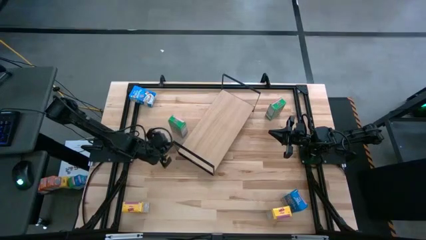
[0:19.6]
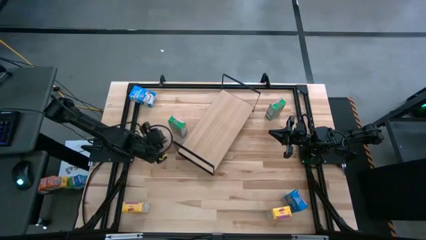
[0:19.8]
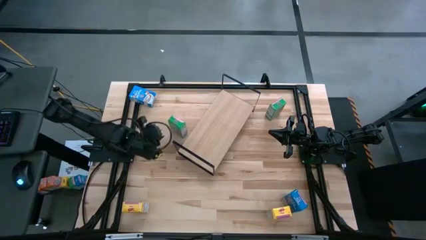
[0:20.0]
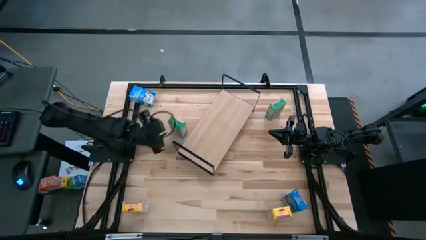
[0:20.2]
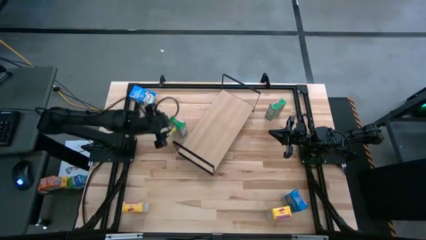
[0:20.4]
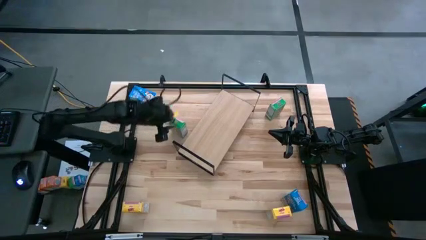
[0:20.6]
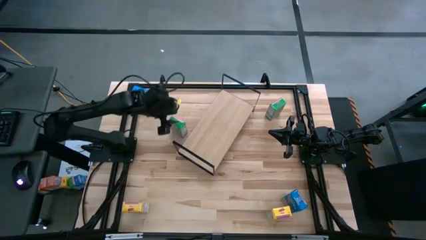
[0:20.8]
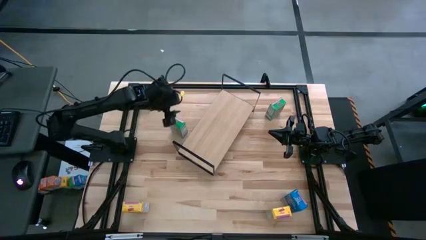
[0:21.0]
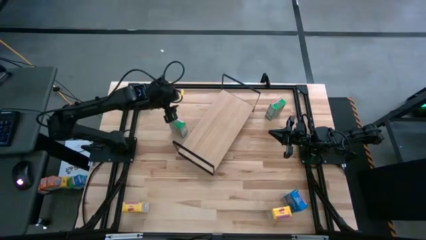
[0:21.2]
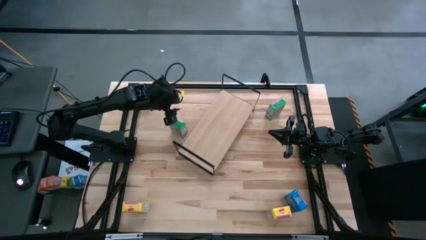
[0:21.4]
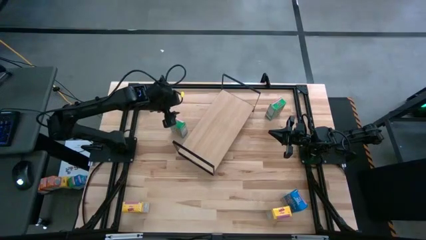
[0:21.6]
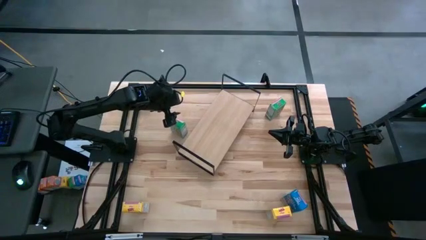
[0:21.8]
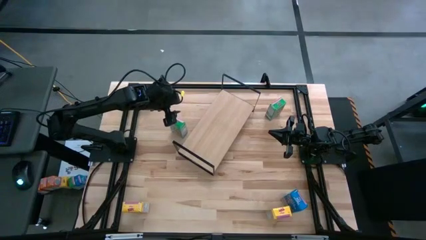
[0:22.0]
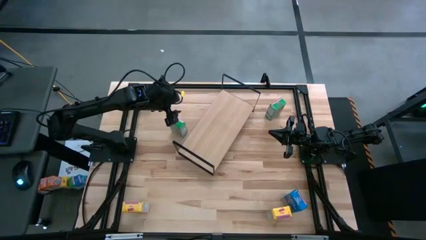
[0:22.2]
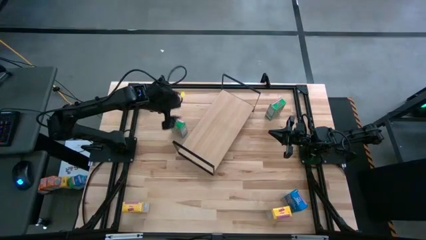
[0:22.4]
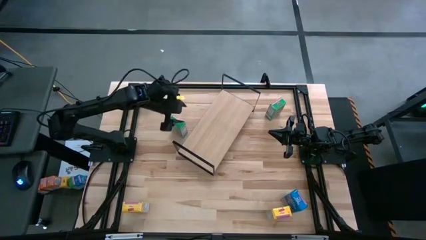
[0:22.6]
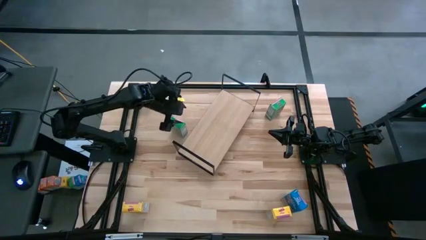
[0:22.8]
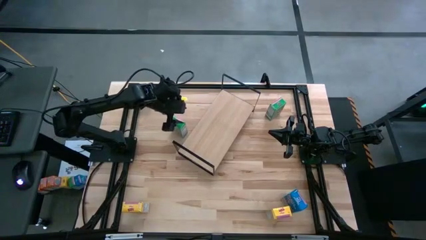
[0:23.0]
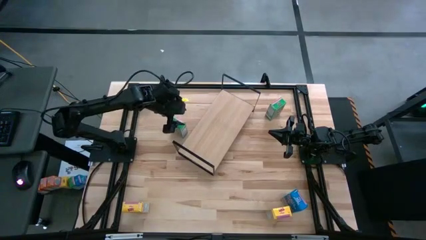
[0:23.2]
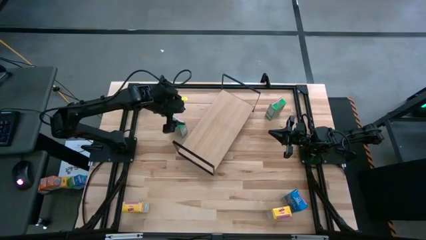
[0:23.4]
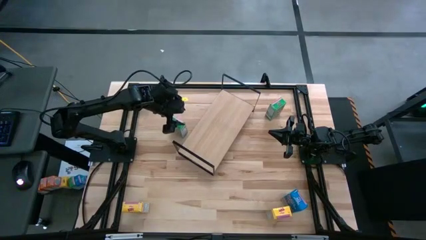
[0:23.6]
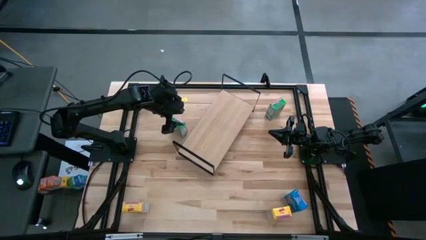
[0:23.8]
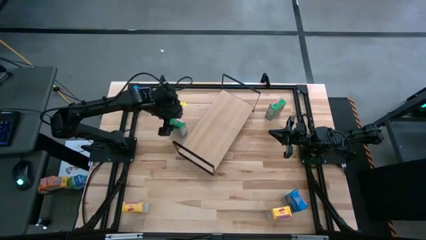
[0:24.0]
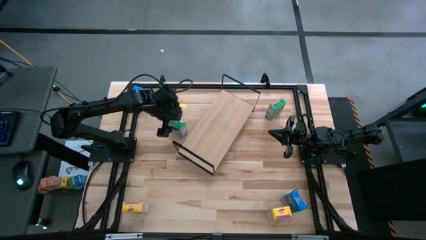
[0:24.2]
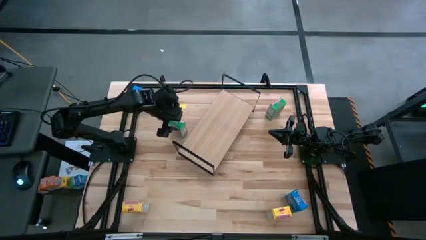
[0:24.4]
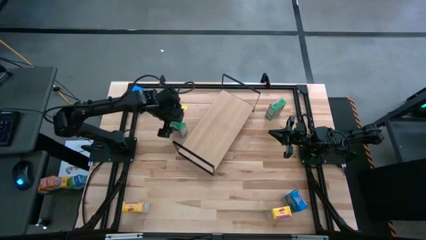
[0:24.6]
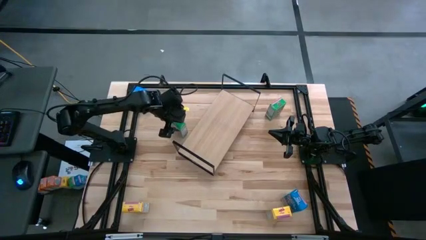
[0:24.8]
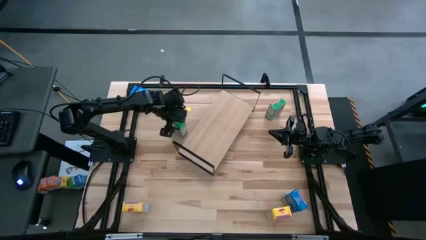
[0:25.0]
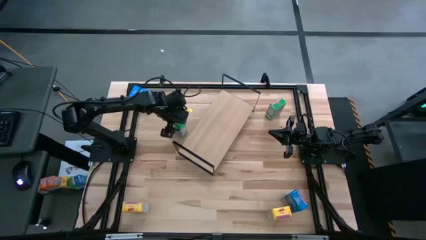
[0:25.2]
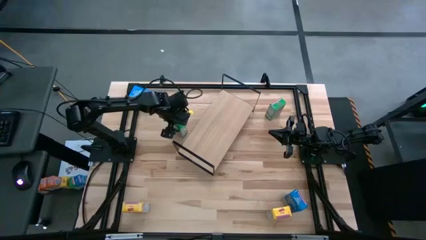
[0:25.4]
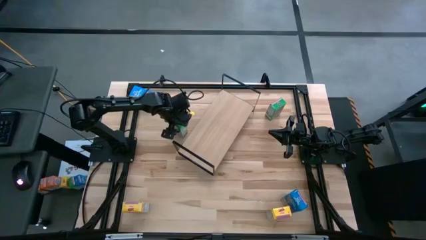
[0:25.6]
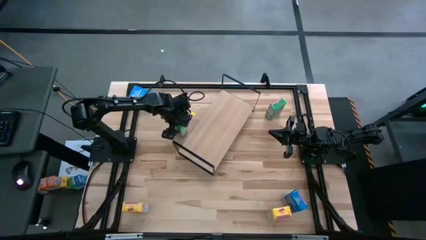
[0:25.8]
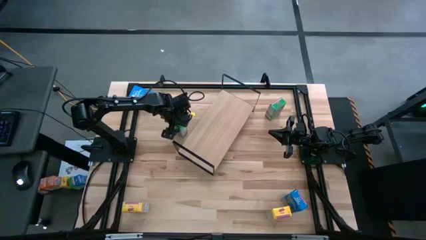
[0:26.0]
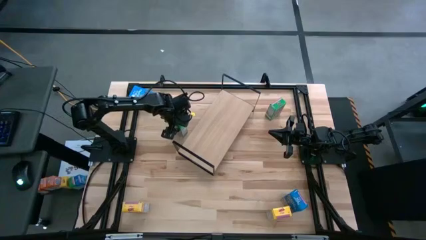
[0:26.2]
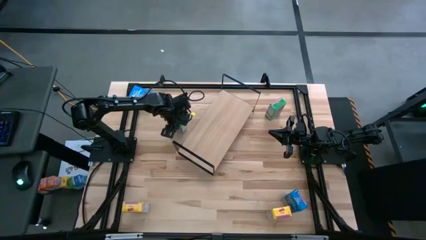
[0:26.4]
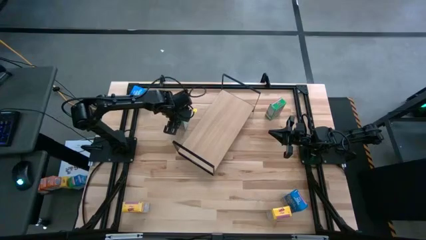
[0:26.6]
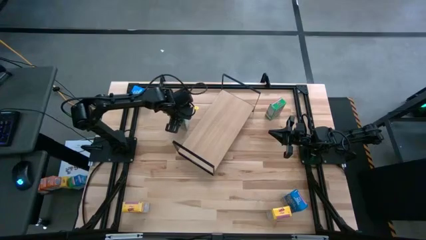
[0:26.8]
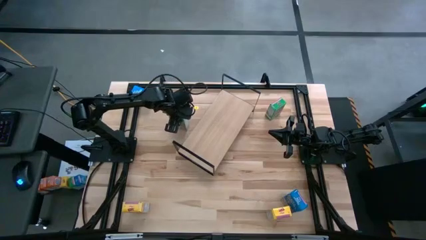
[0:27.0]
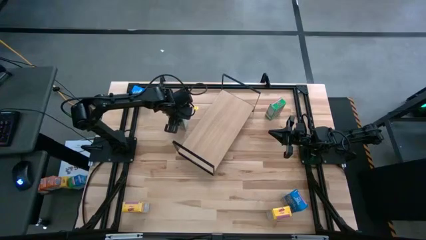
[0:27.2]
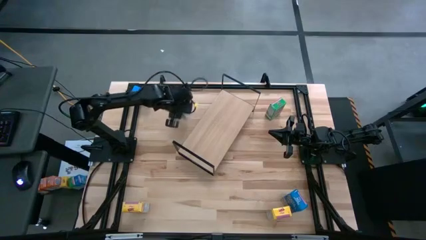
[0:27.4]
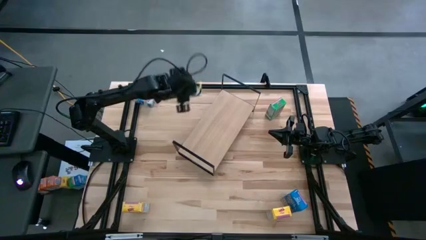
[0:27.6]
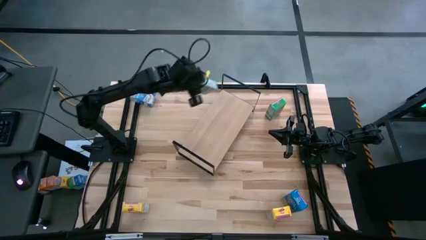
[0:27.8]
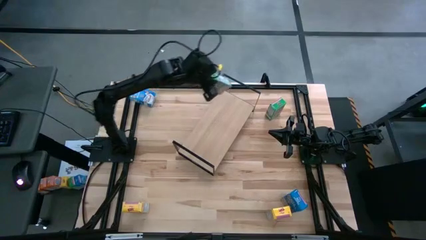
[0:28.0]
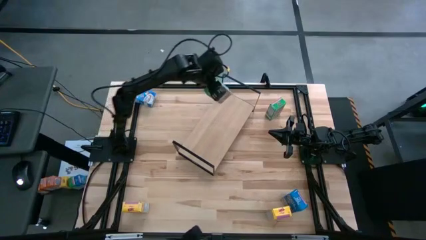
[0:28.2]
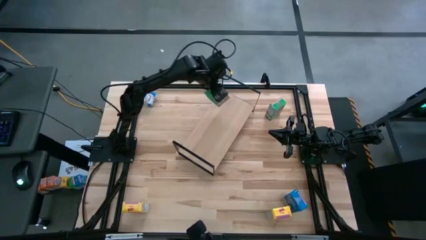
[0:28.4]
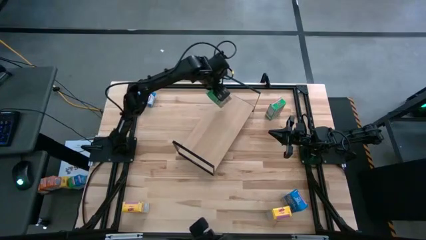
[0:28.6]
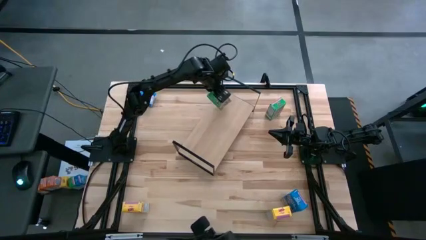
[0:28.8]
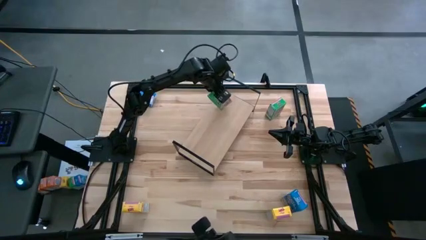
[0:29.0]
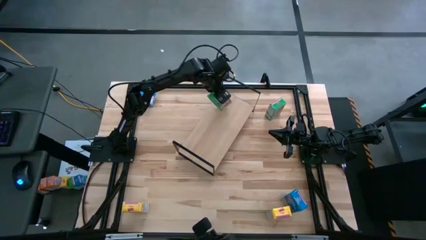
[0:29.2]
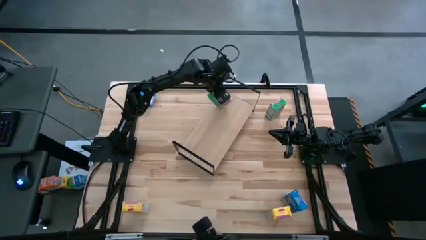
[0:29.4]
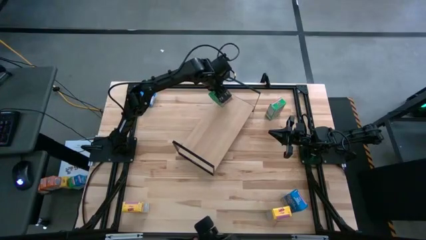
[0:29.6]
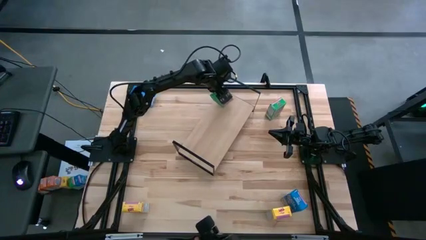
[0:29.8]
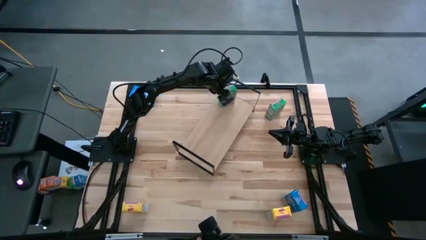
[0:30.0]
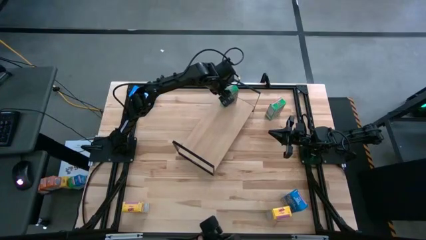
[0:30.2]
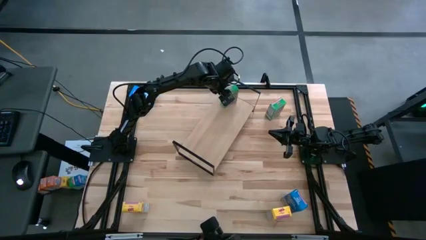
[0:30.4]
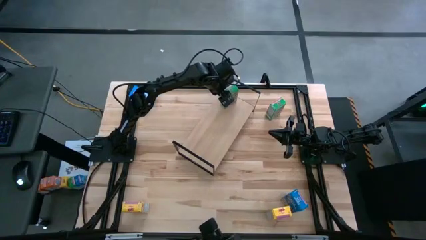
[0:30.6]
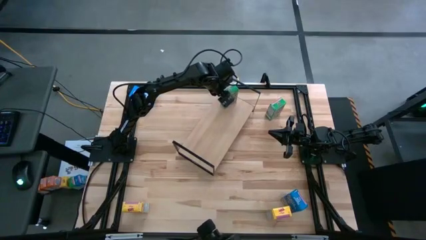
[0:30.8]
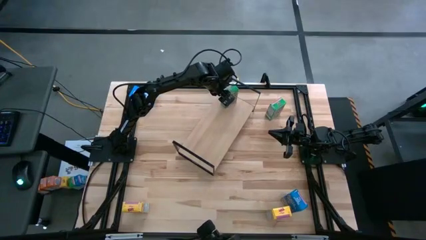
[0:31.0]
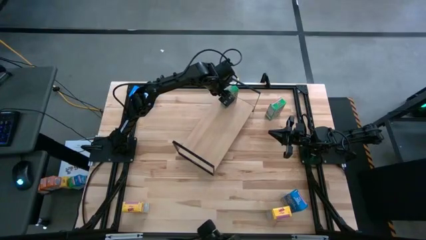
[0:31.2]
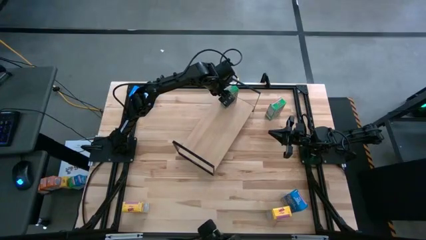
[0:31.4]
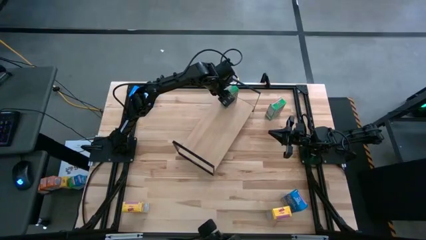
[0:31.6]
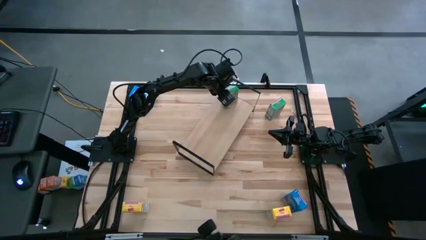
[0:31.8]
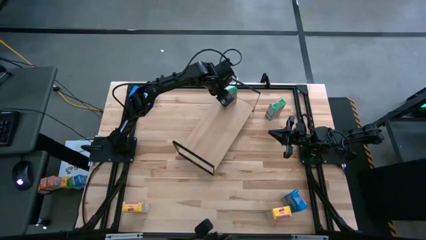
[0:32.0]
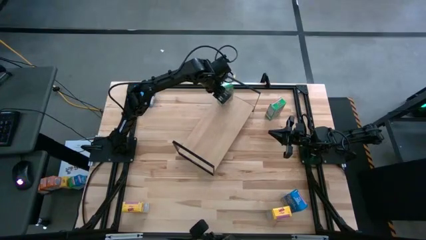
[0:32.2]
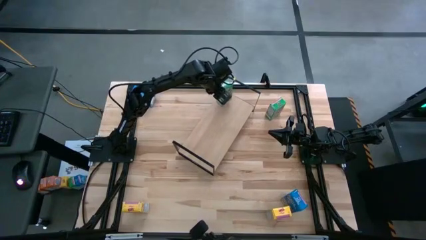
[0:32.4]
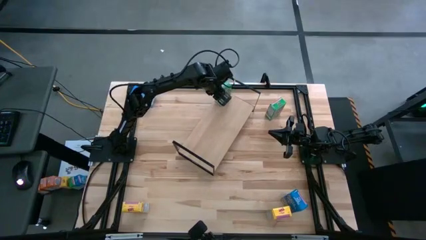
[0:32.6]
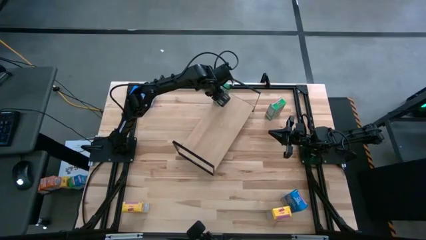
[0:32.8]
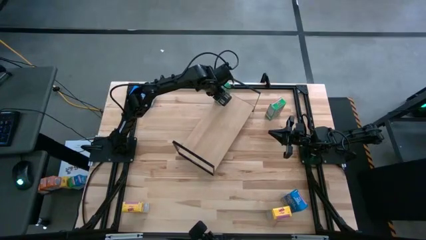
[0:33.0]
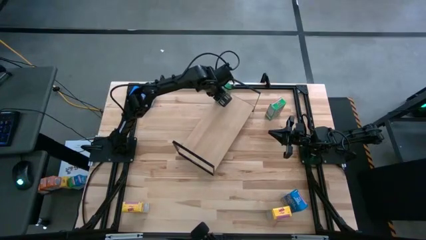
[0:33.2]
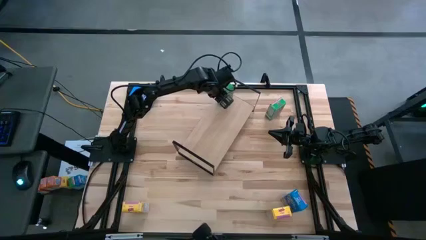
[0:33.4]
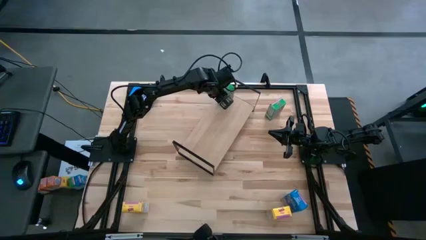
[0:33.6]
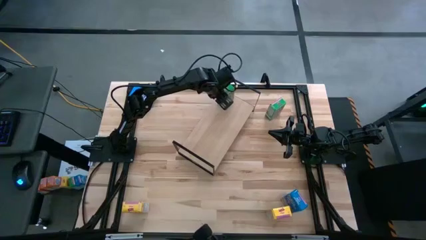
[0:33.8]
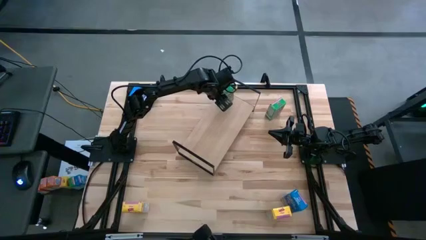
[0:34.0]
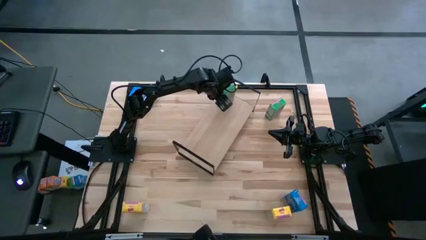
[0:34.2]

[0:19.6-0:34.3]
Task: Stack cereal on shelf
Put the left green cereal box on the shelf
